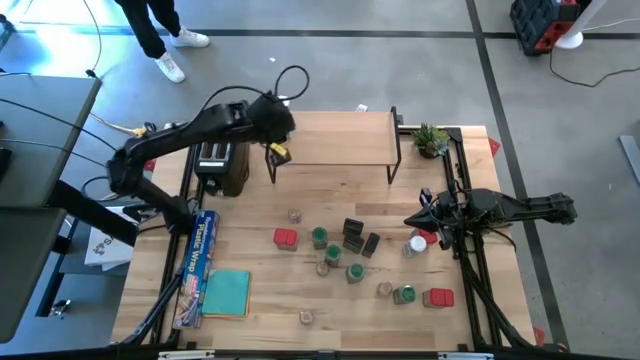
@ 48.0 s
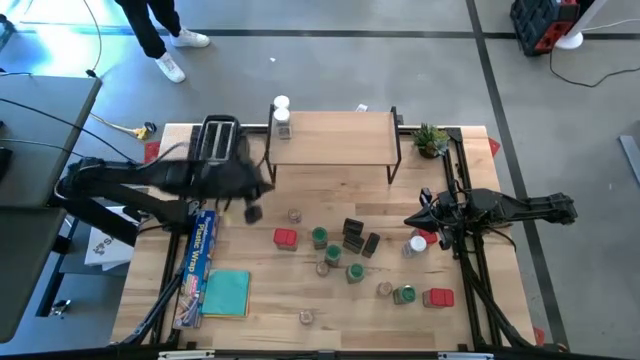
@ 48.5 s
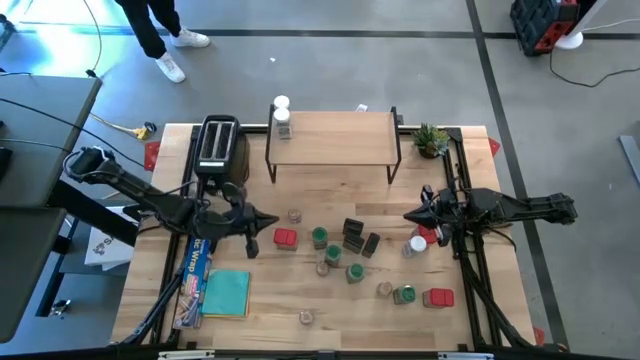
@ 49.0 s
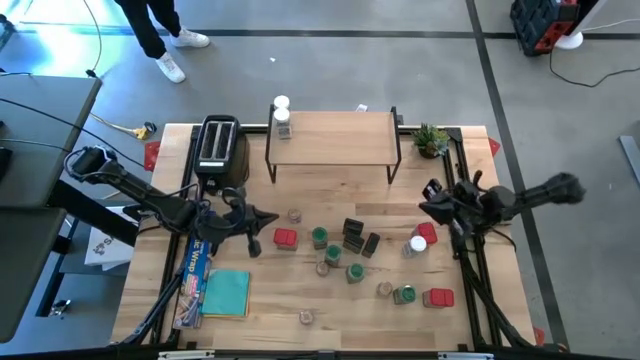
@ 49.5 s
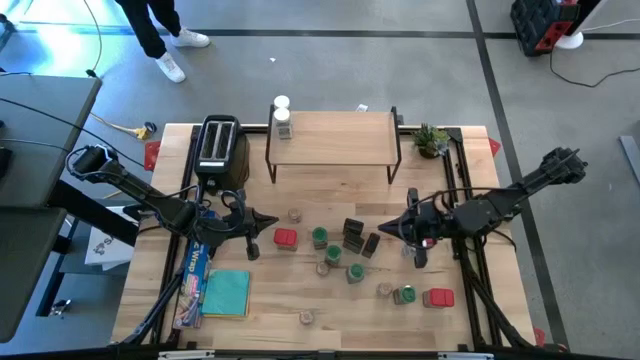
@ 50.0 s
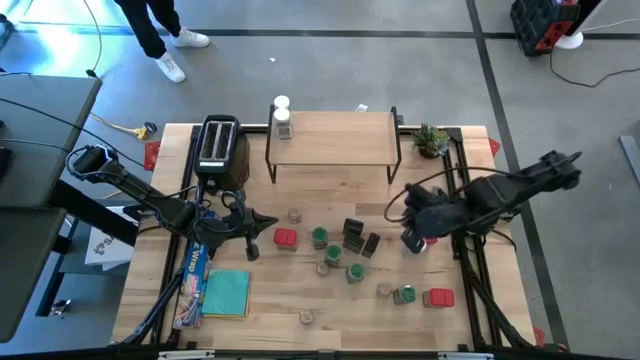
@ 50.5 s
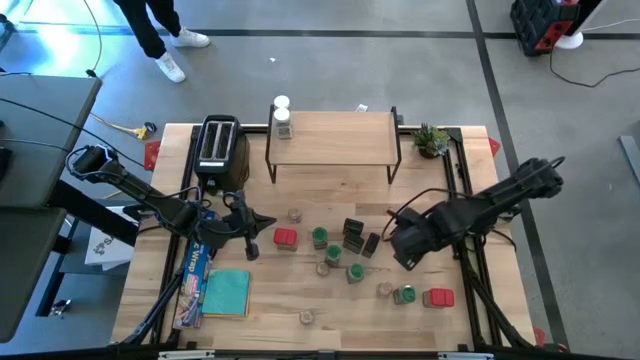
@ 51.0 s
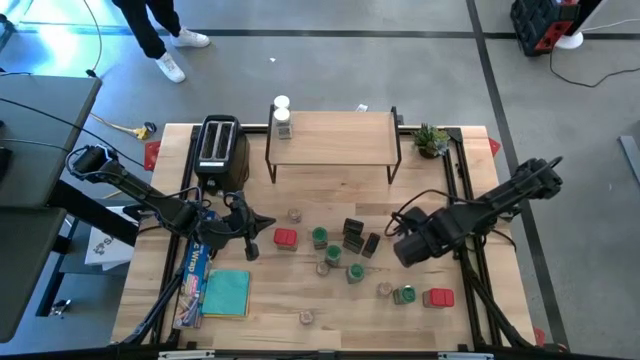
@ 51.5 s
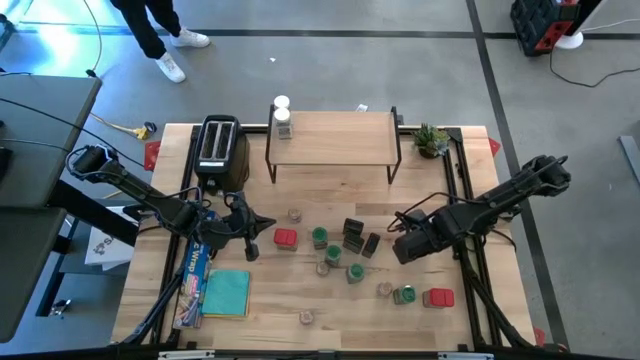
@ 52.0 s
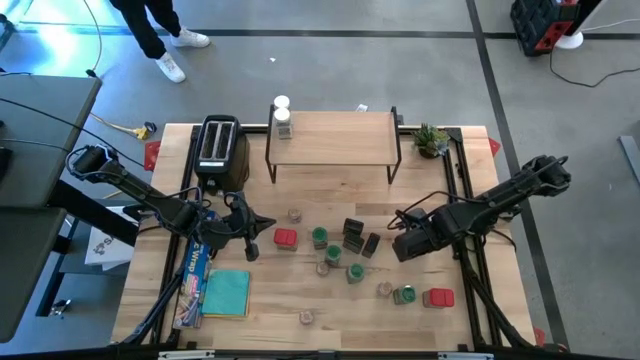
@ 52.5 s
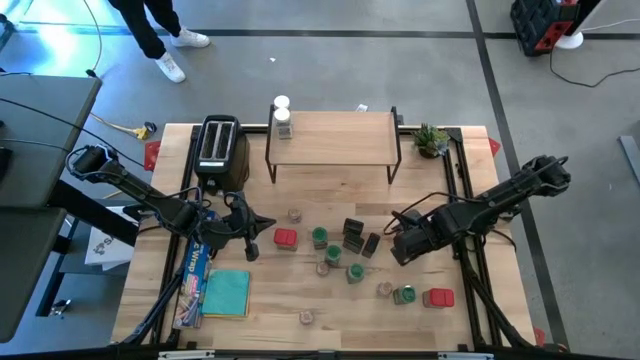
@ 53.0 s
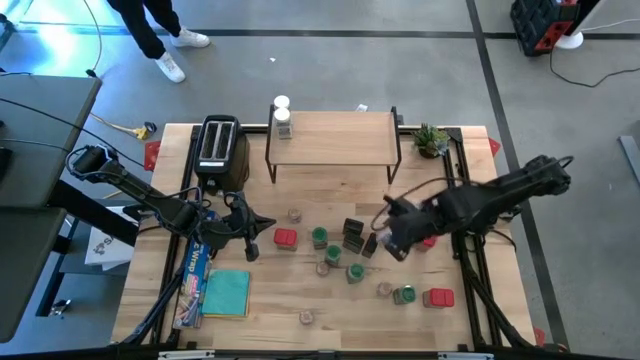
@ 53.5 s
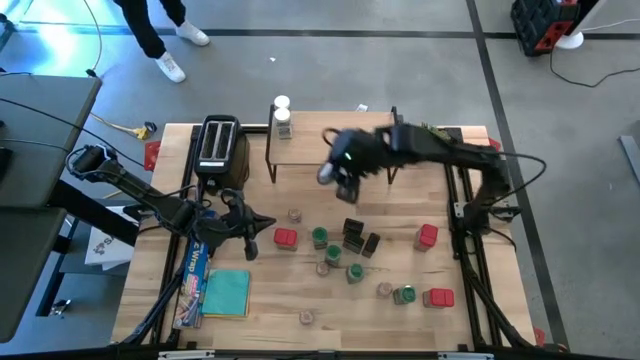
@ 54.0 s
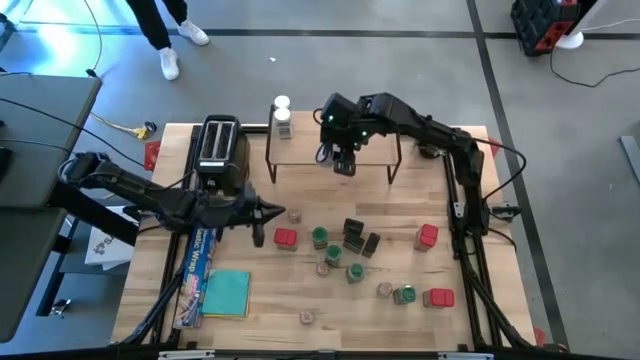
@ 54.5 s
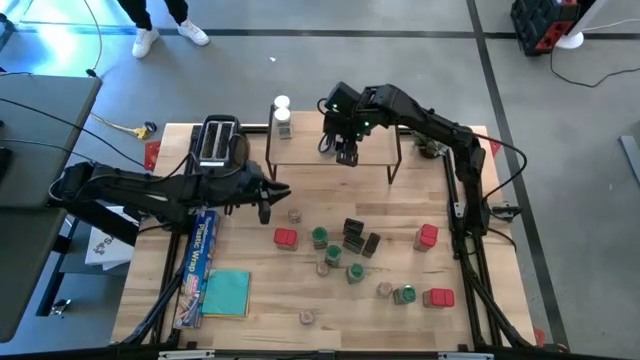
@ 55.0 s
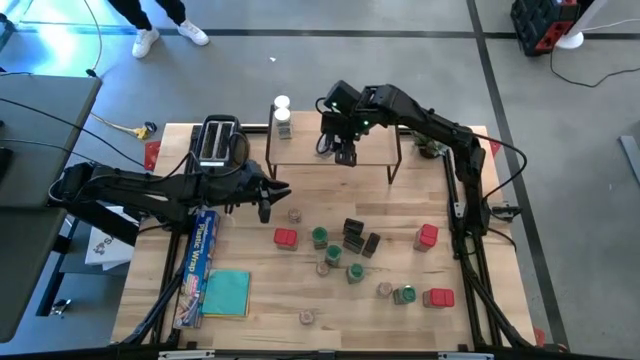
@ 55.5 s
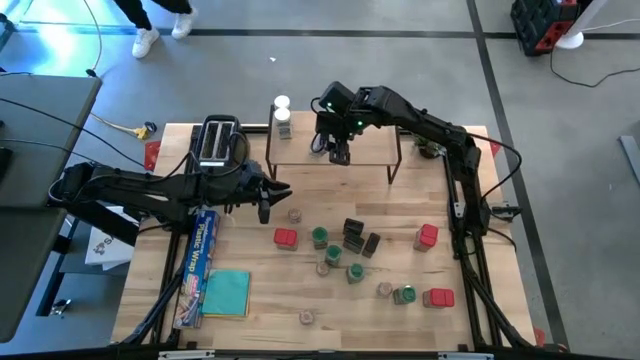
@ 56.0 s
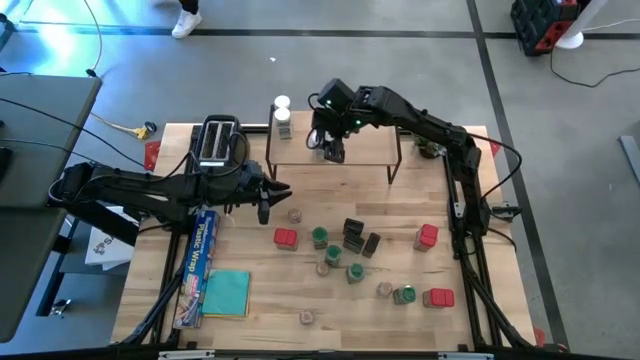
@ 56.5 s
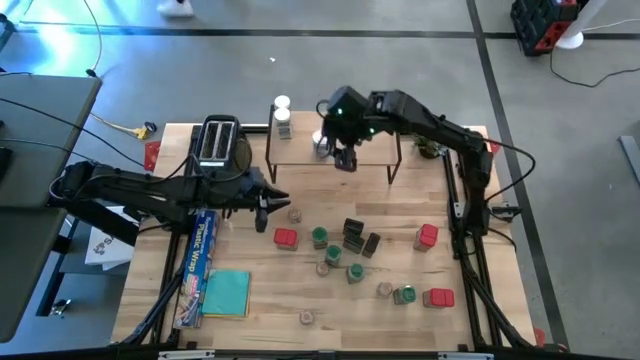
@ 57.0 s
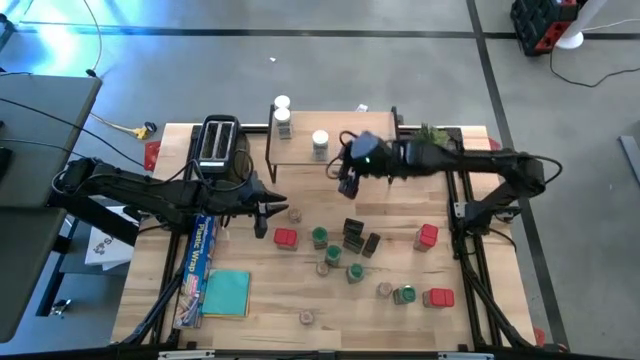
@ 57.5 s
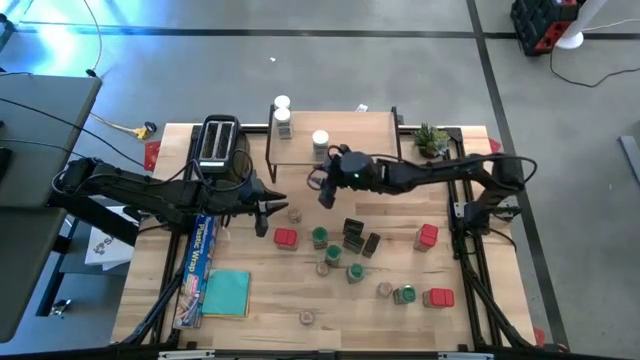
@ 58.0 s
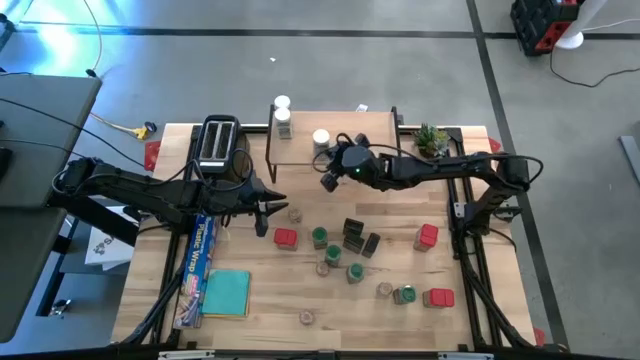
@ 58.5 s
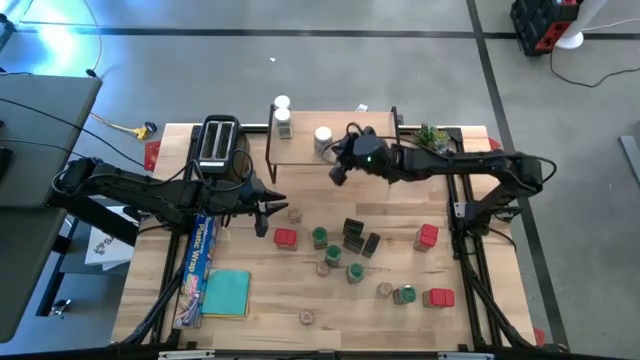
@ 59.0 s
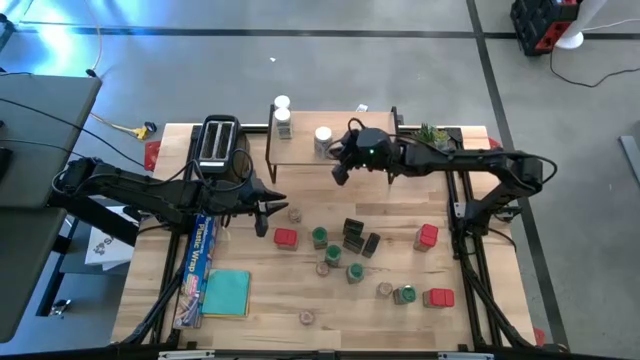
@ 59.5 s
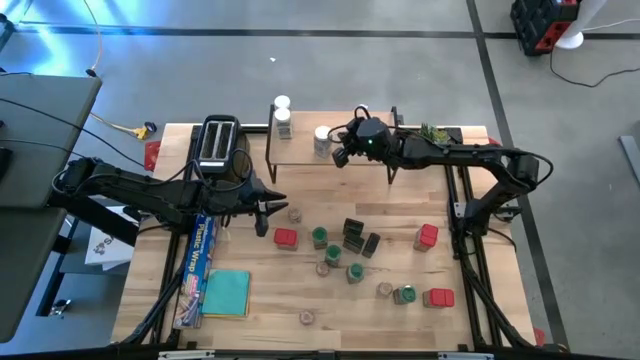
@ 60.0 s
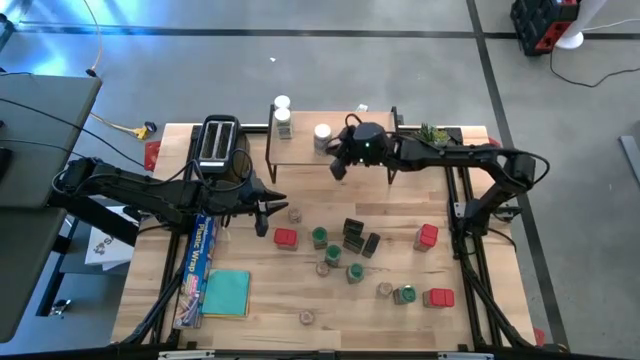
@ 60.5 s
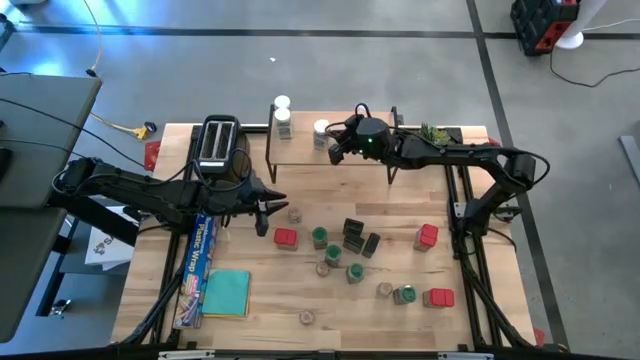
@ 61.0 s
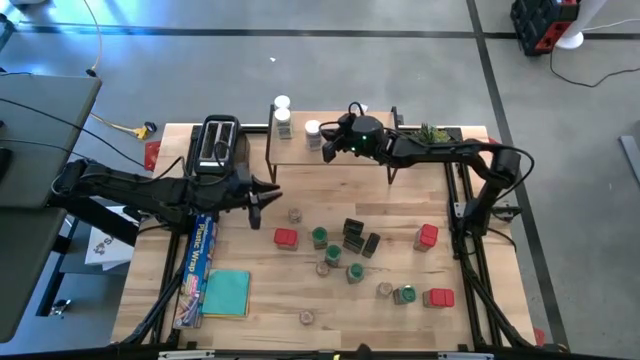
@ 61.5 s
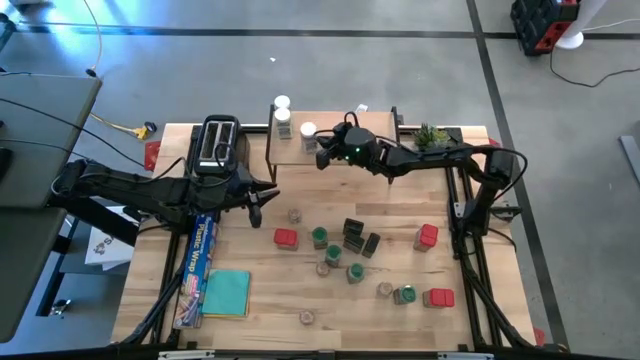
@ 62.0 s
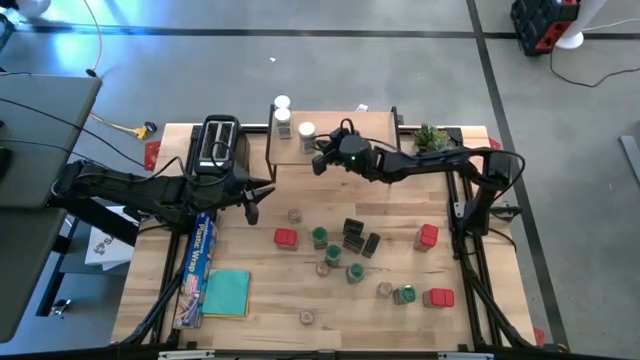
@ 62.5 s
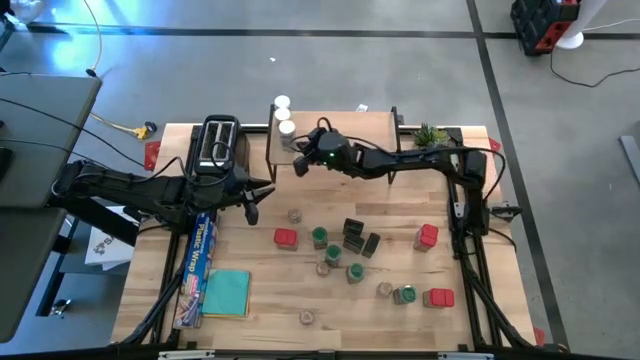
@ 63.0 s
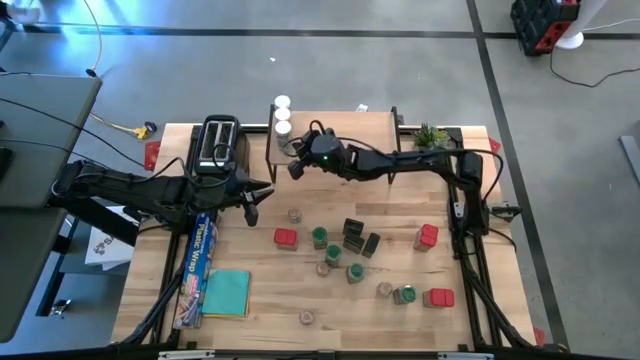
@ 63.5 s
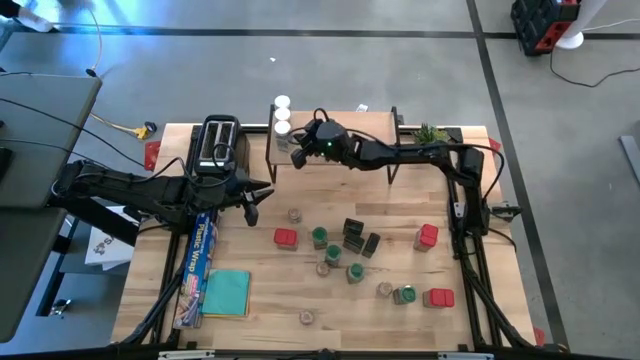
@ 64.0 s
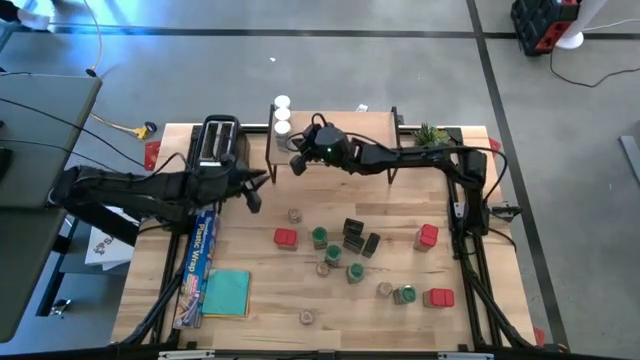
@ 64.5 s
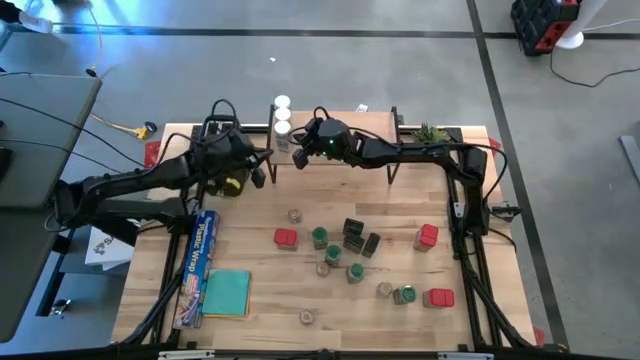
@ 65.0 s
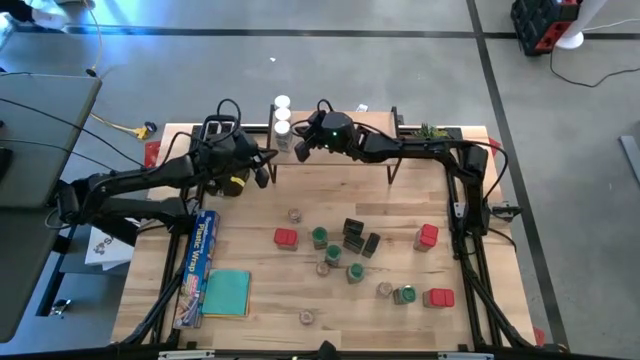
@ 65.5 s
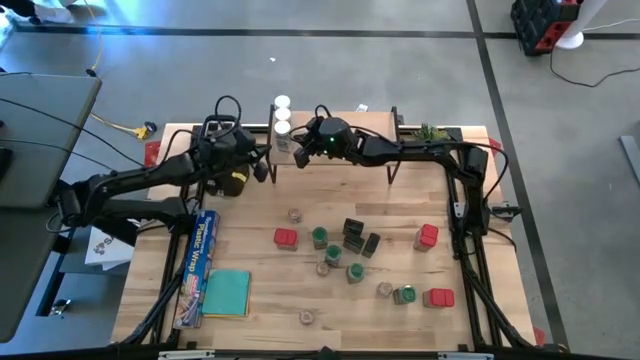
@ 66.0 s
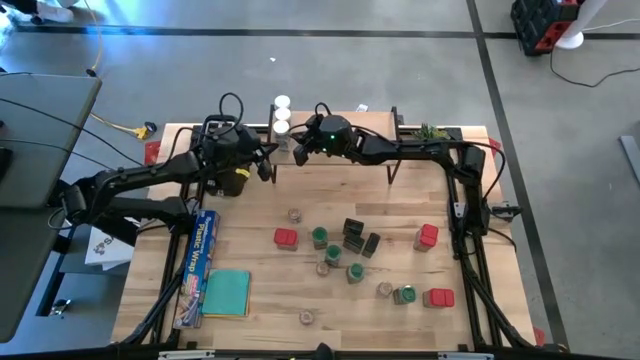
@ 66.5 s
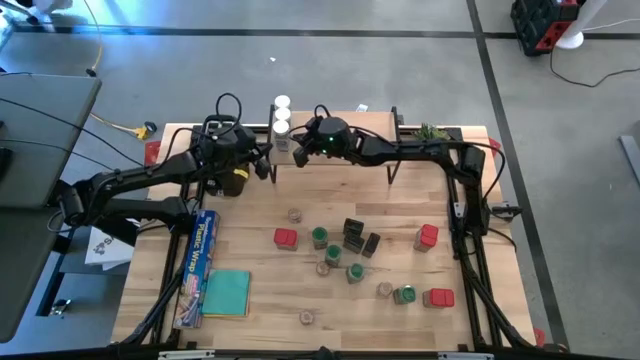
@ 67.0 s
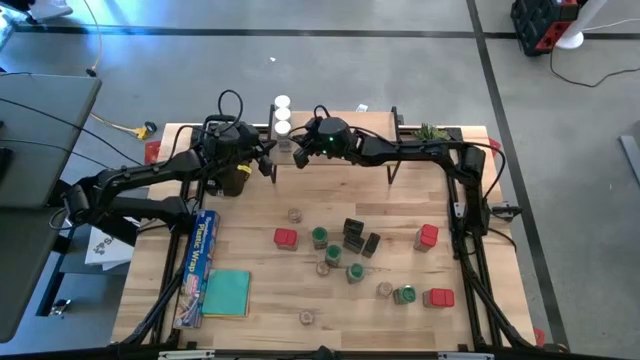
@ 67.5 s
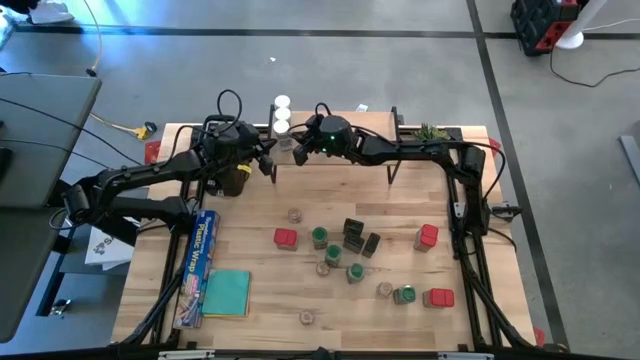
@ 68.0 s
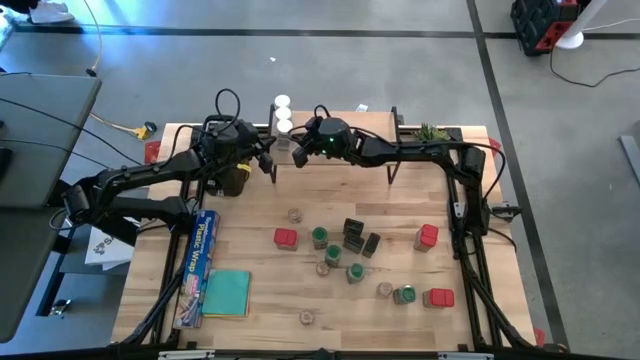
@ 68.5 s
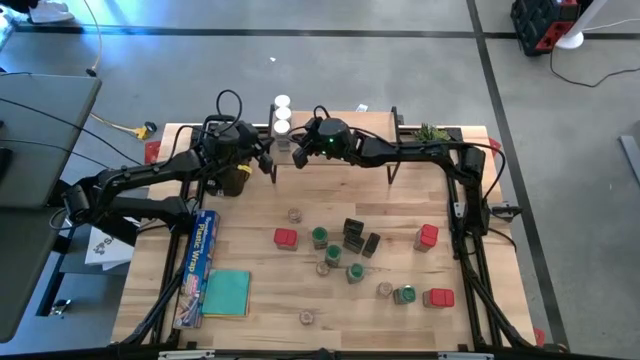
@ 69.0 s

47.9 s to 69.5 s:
Task: Shelf spices
Put the white seasoning bottle on the shelf aligned with the other white seasoning bottle
